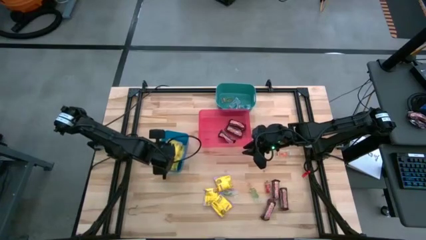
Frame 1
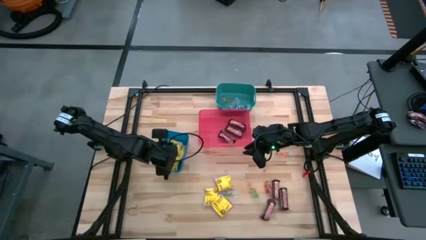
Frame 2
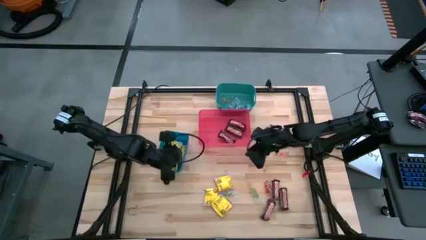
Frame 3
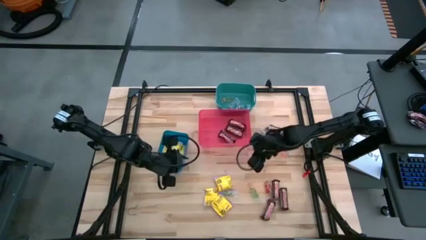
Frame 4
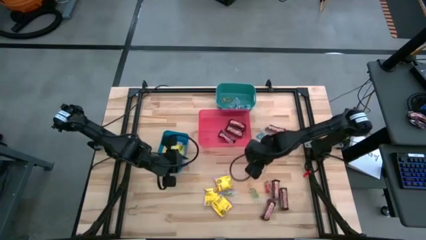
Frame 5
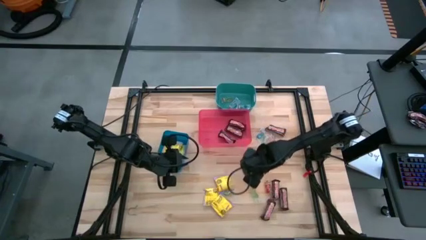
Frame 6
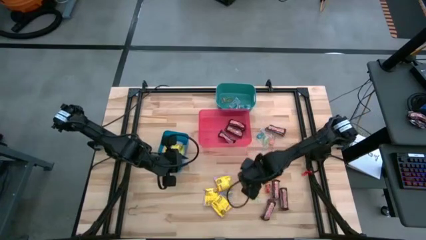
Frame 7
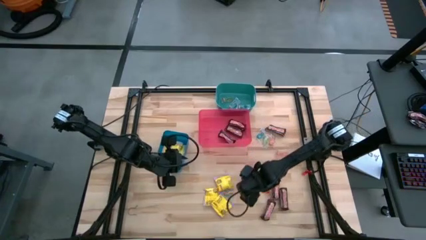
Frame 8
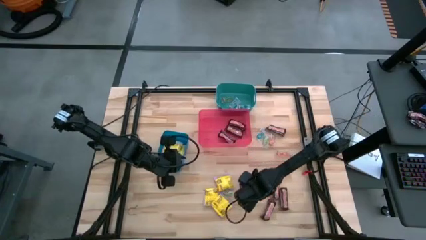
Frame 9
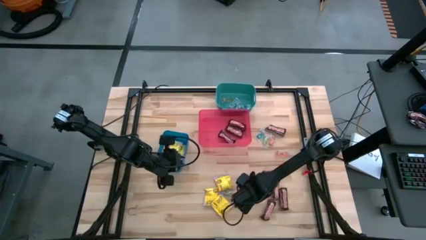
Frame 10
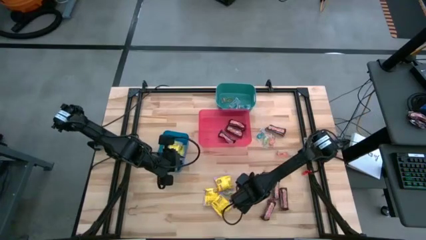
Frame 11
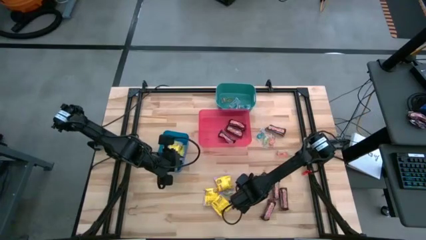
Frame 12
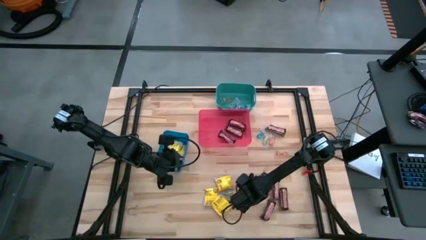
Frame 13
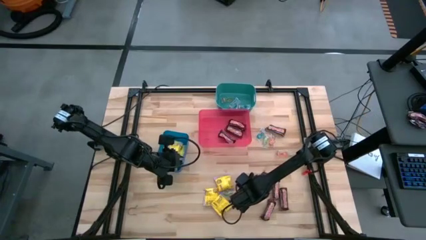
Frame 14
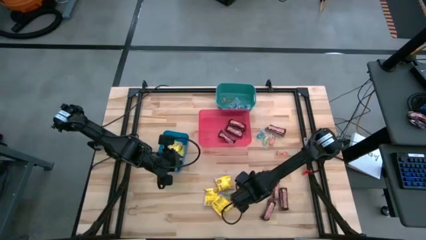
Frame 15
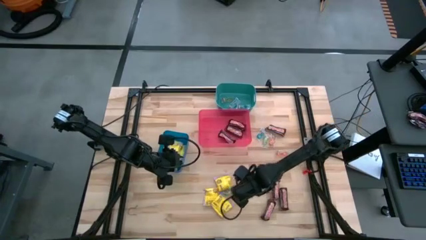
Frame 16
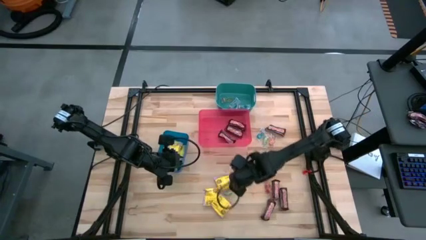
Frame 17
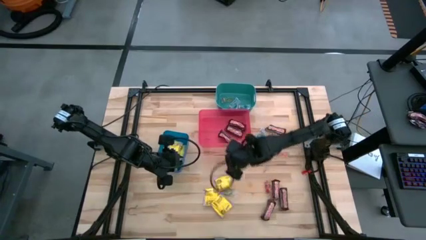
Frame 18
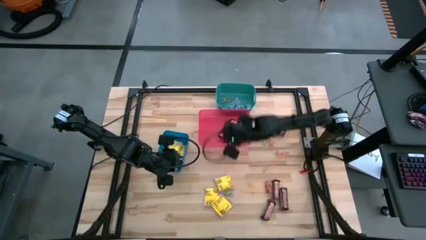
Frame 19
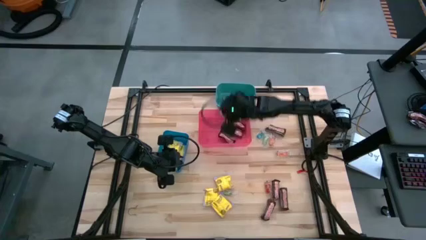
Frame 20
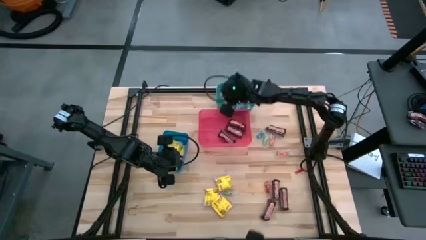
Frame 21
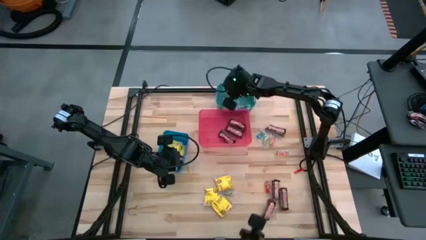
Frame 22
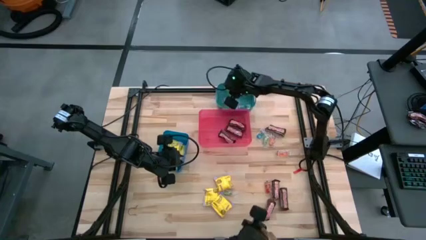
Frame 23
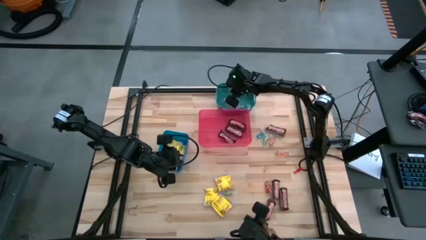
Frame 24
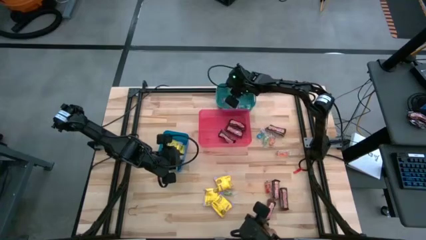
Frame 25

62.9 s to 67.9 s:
Task: Sort candy
Put the green gummy into the green bin

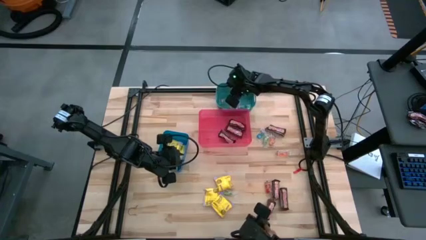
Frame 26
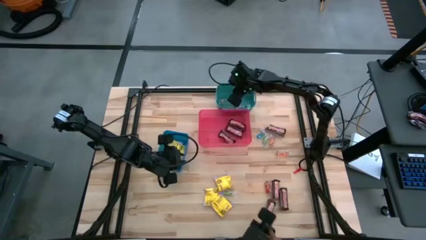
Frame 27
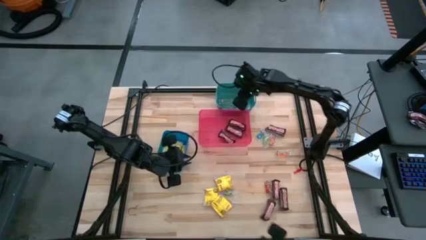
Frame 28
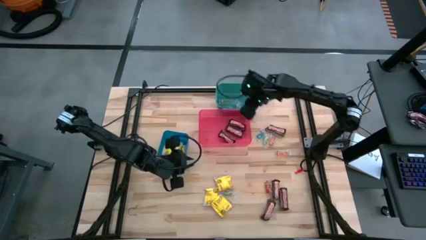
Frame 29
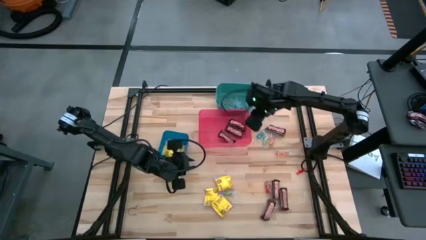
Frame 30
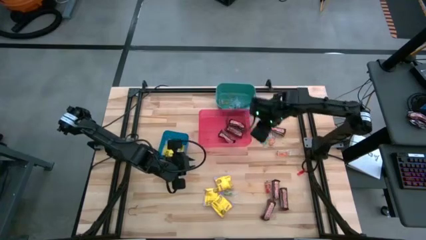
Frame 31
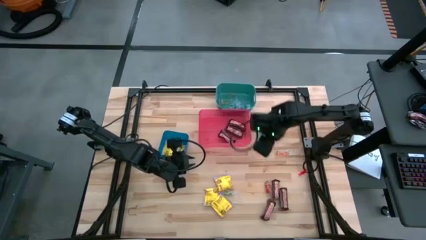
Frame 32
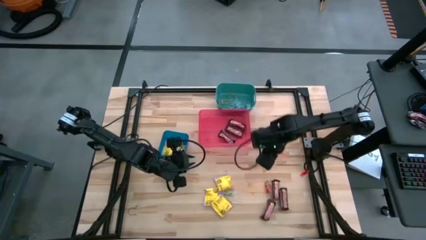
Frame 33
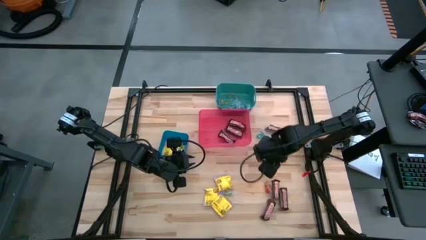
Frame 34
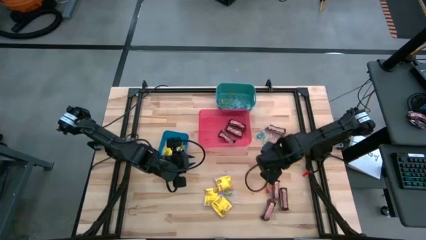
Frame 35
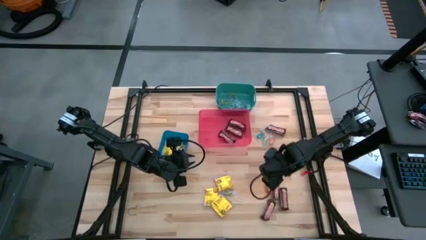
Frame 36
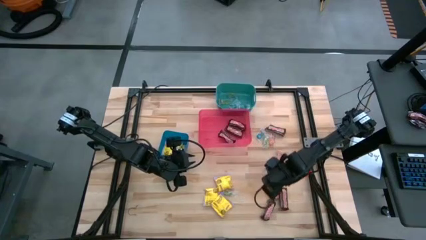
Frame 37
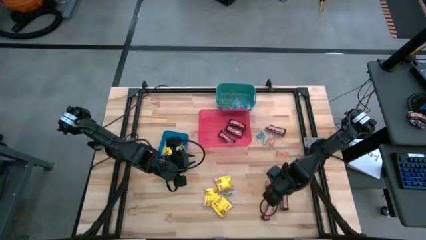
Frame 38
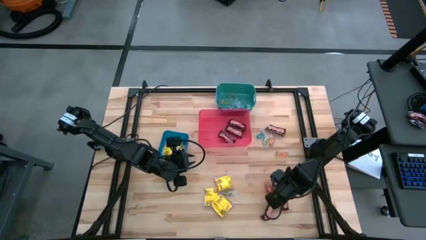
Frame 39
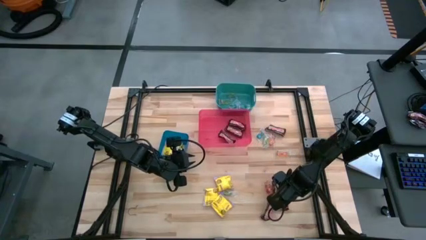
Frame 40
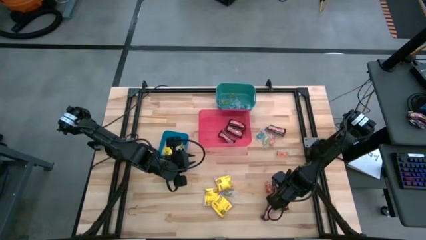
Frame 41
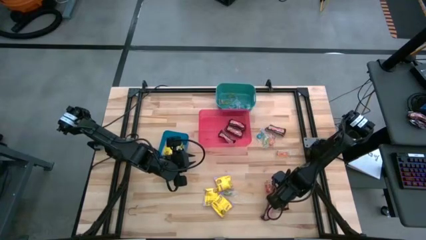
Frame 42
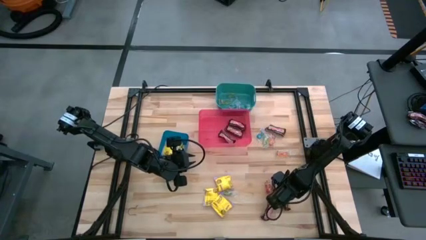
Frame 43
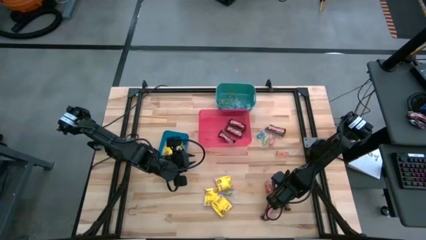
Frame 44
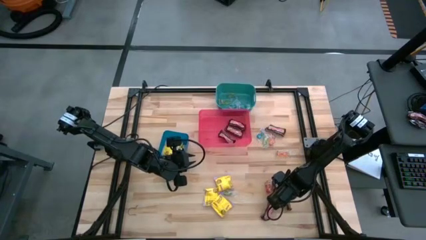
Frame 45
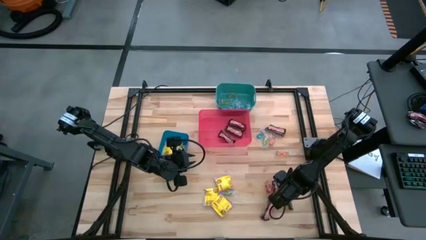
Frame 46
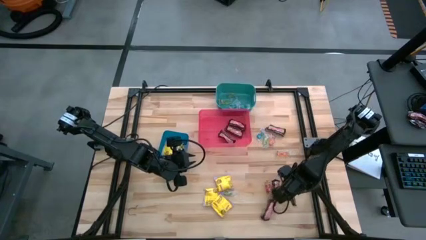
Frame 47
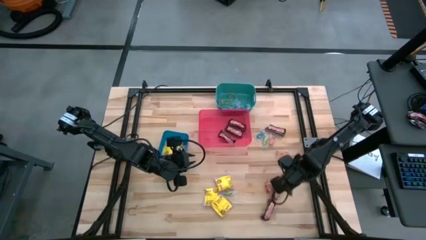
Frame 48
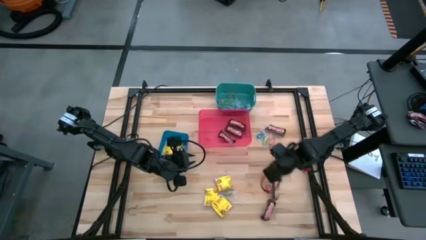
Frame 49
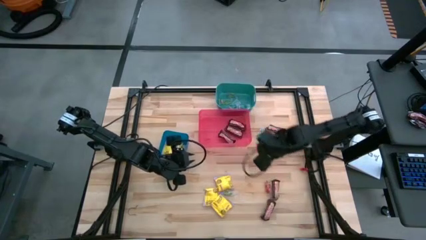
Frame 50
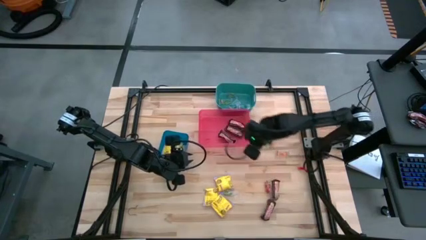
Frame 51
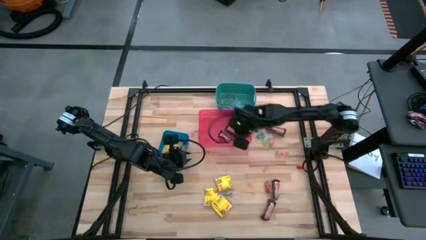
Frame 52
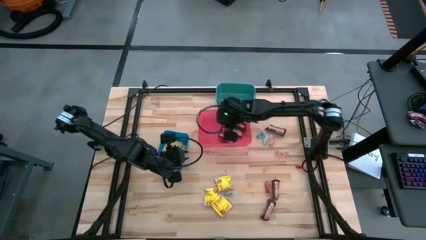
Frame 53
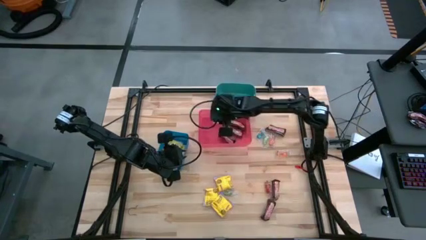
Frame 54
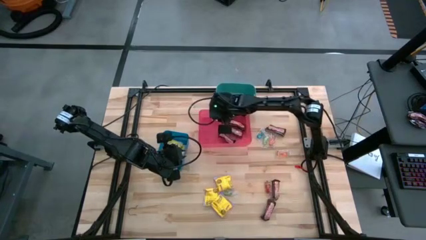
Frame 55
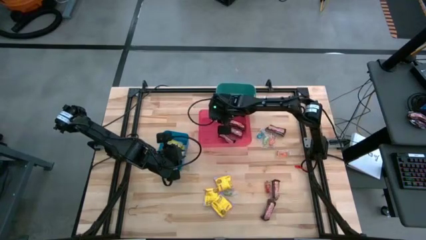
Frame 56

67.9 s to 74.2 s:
Put the brown chocolate bar into the red bin

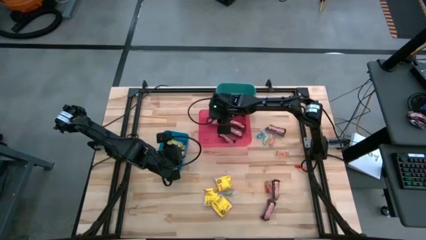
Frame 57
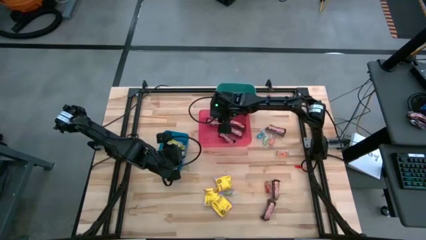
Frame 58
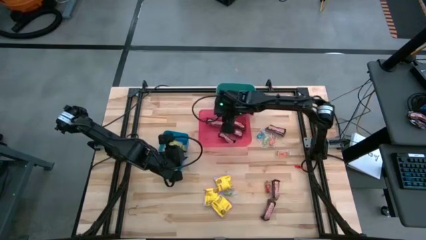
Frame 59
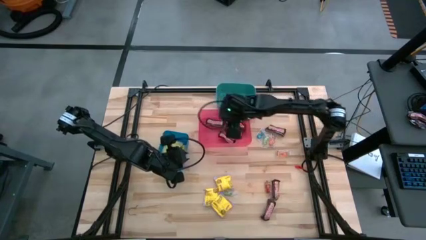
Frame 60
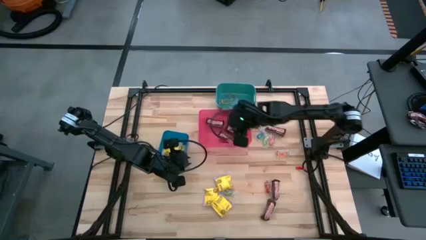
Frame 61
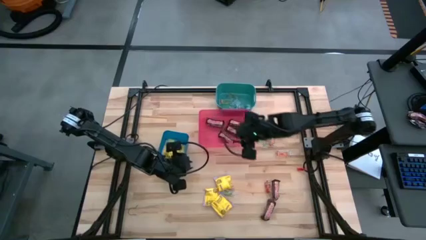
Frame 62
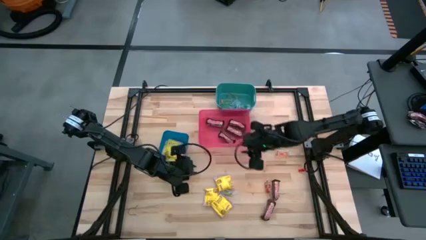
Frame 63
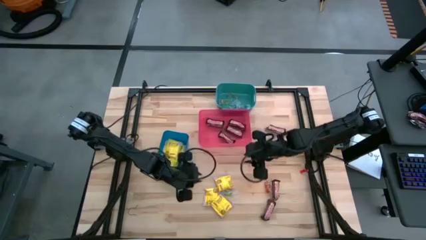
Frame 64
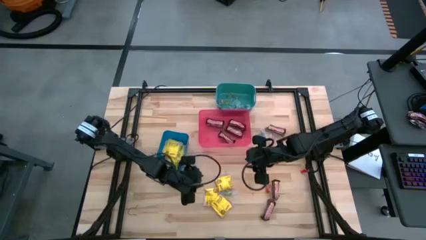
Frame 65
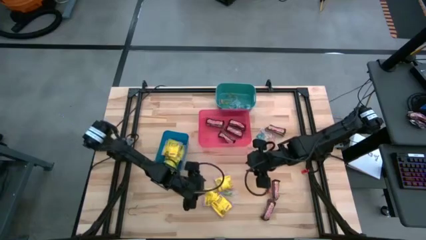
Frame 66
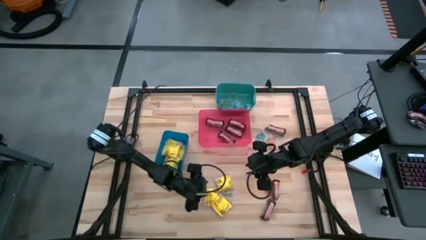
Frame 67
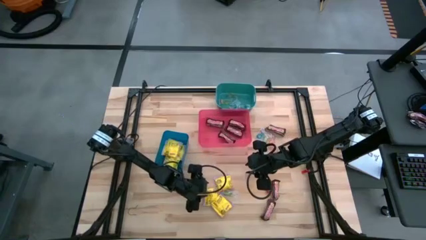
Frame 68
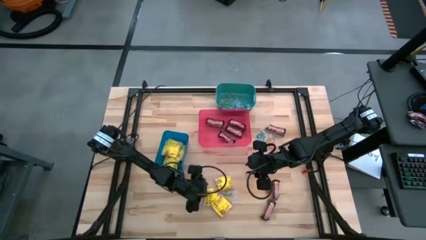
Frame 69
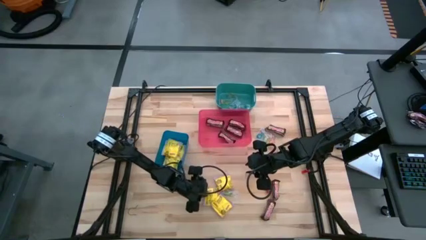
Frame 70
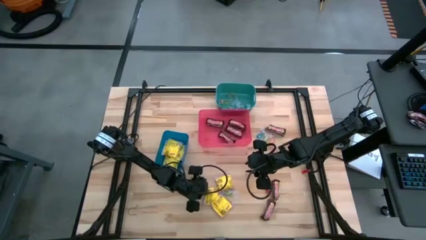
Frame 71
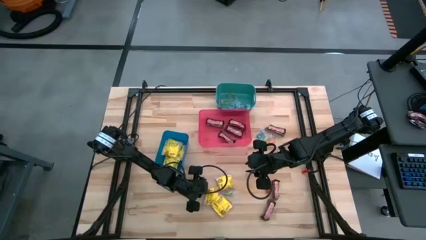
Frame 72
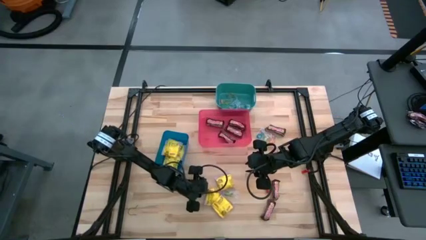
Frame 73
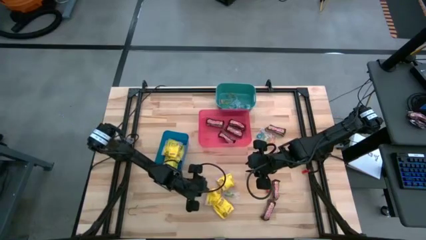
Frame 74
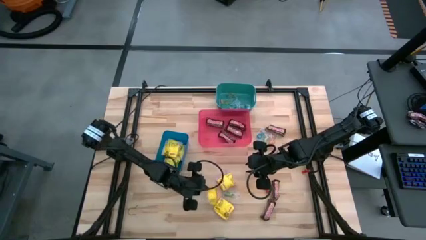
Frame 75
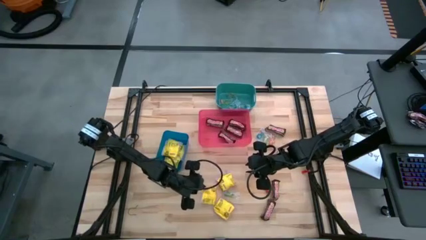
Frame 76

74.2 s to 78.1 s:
Put the yellow candy into the blue bin

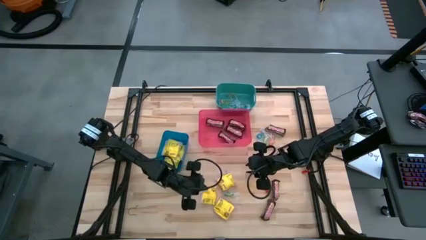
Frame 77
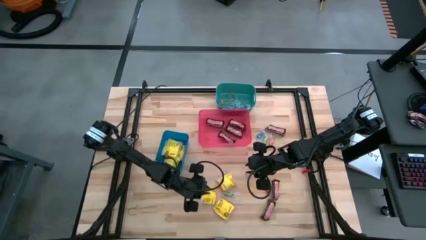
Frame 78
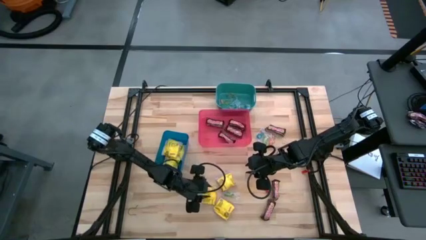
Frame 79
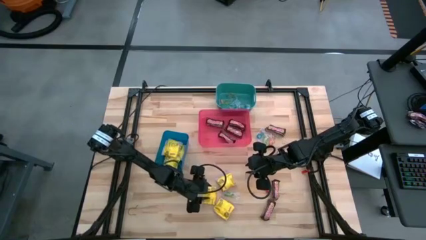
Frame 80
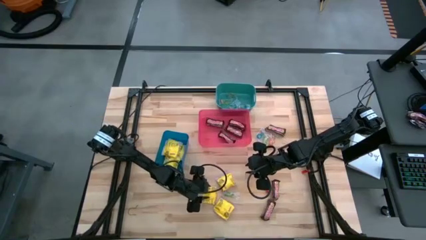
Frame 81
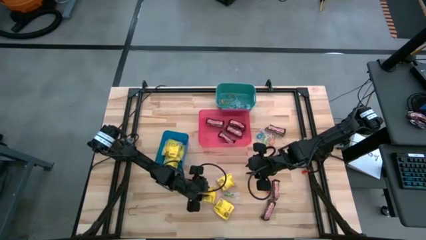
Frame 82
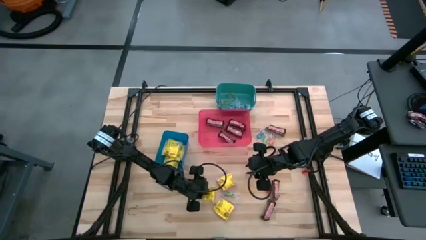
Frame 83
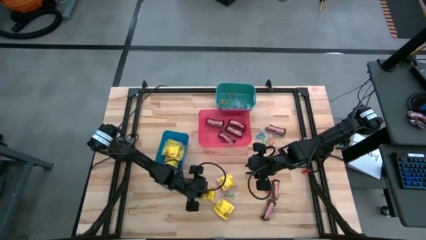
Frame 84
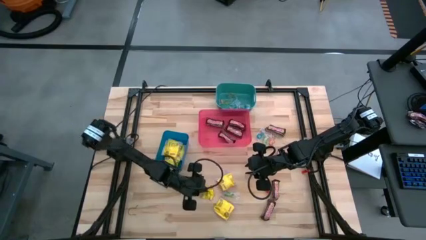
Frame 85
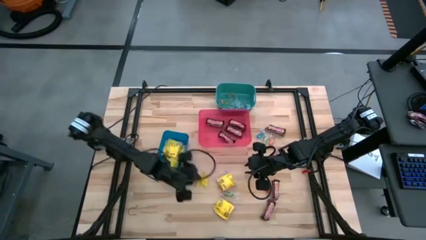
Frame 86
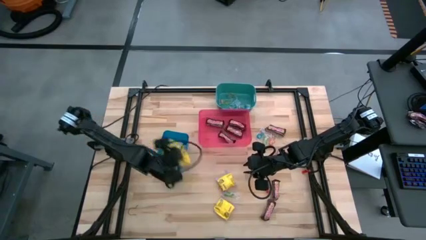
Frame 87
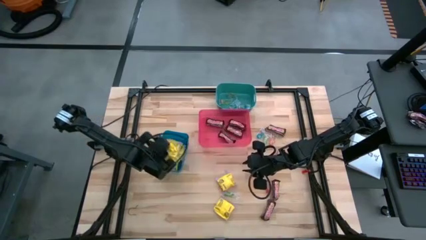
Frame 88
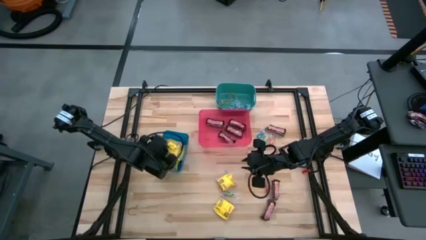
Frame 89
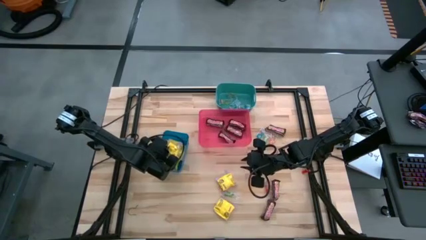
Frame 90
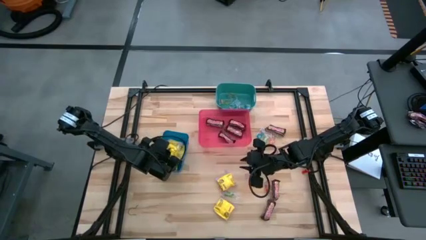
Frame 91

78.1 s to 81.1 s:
Put the yellow candy into the blue bin
